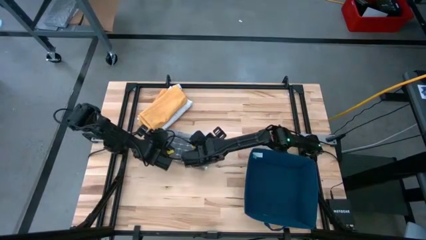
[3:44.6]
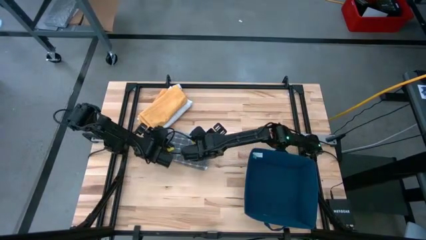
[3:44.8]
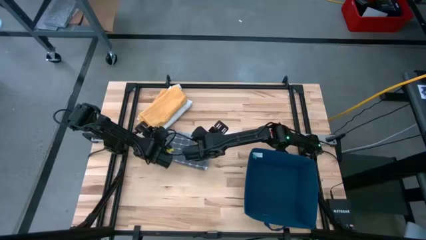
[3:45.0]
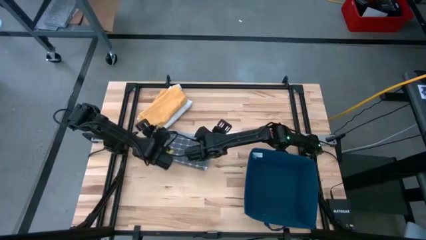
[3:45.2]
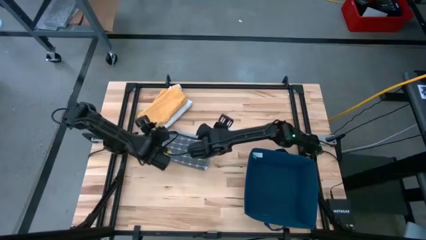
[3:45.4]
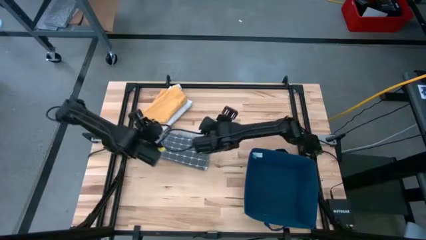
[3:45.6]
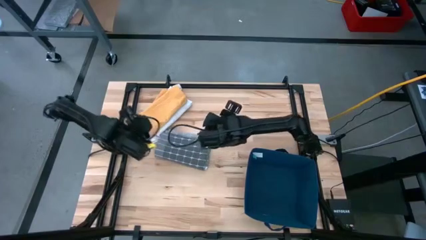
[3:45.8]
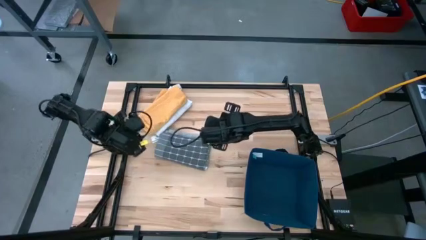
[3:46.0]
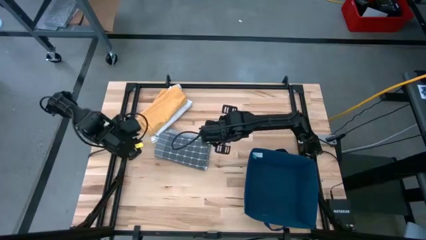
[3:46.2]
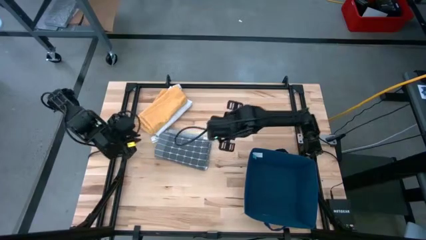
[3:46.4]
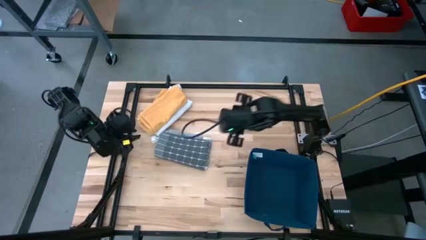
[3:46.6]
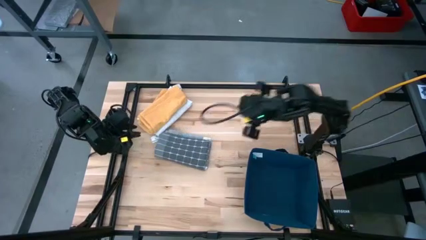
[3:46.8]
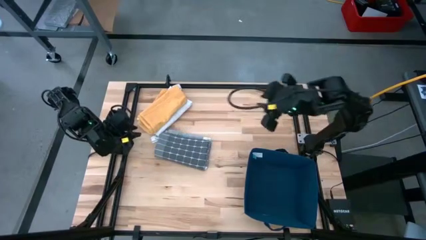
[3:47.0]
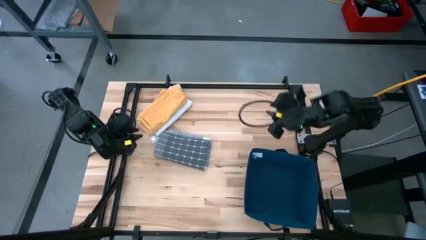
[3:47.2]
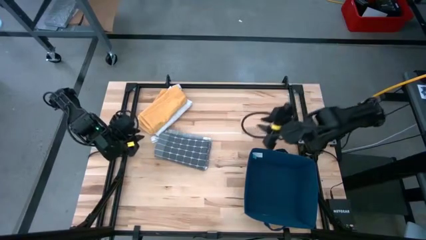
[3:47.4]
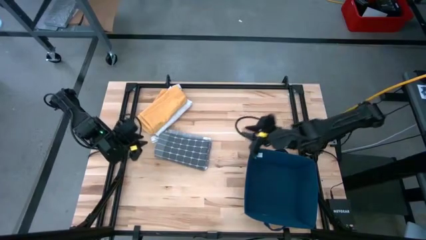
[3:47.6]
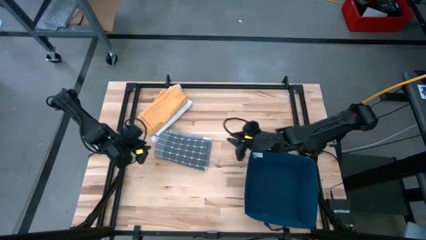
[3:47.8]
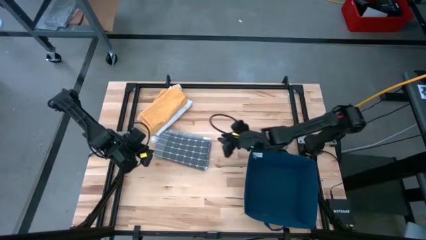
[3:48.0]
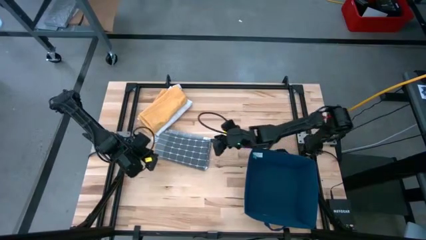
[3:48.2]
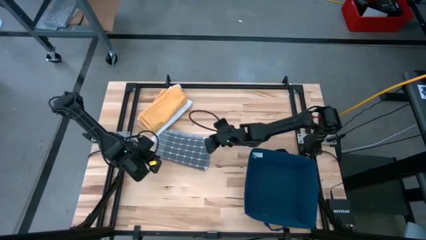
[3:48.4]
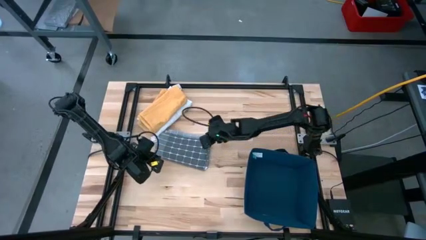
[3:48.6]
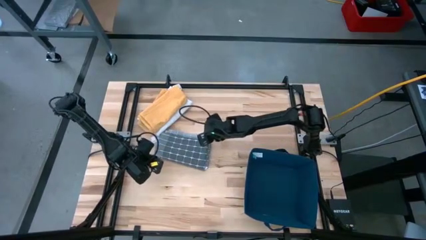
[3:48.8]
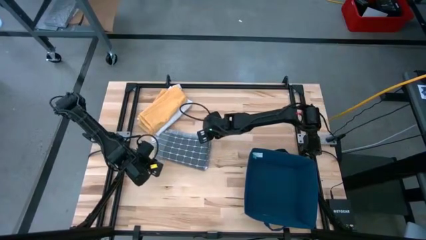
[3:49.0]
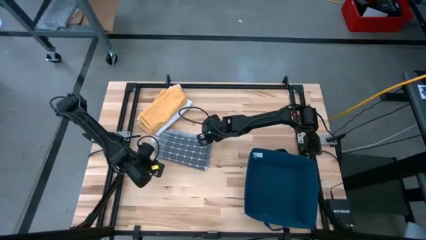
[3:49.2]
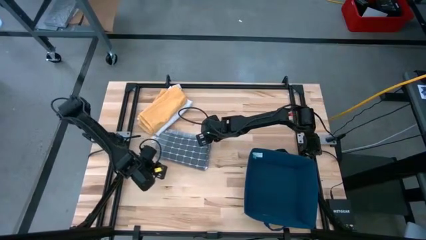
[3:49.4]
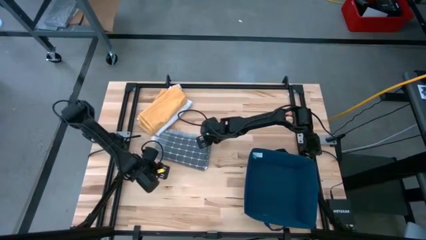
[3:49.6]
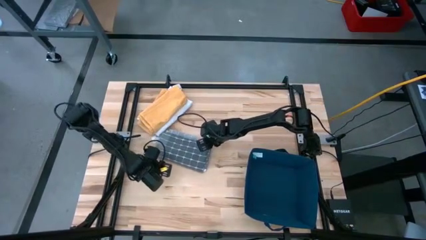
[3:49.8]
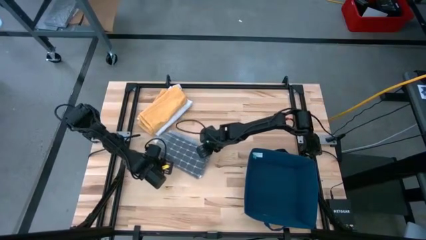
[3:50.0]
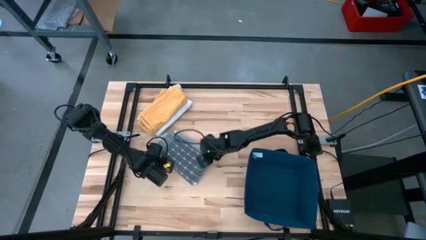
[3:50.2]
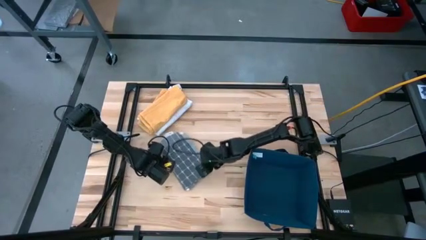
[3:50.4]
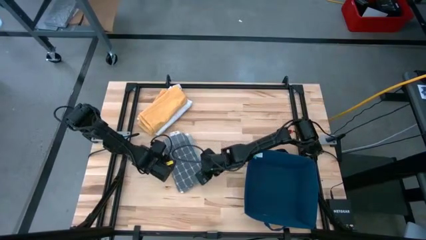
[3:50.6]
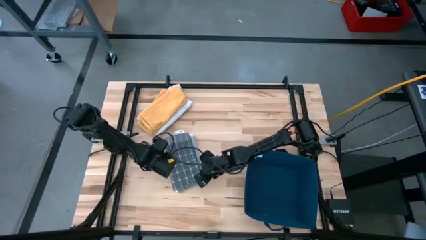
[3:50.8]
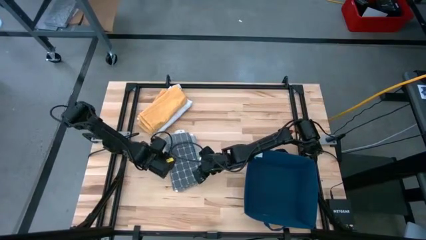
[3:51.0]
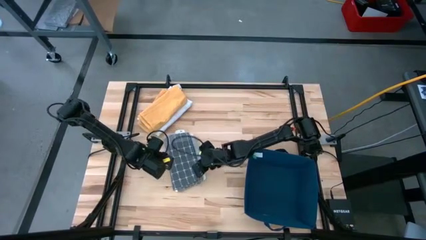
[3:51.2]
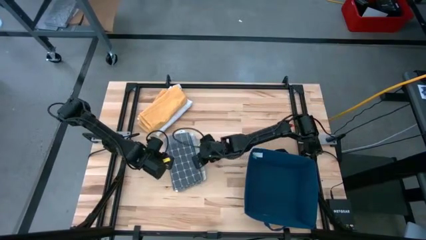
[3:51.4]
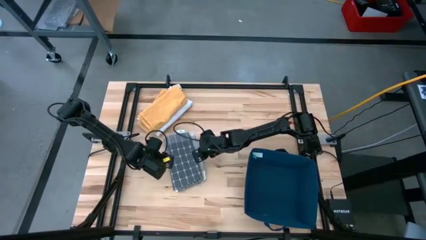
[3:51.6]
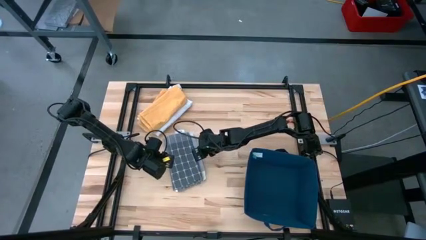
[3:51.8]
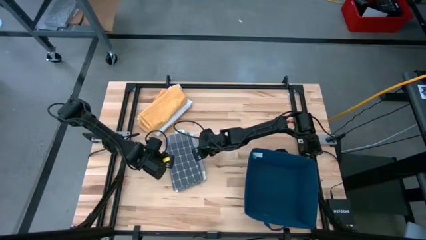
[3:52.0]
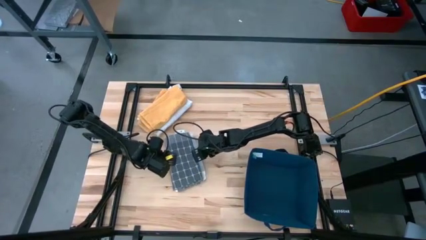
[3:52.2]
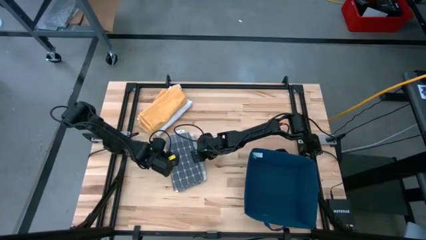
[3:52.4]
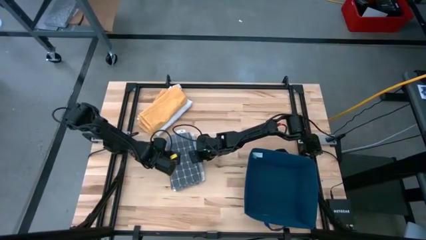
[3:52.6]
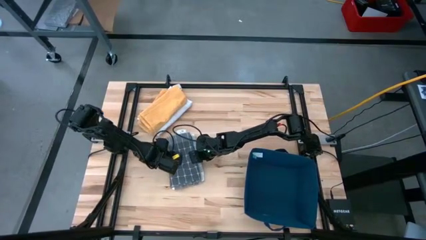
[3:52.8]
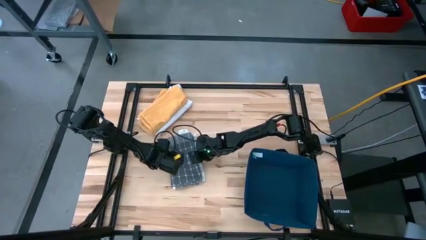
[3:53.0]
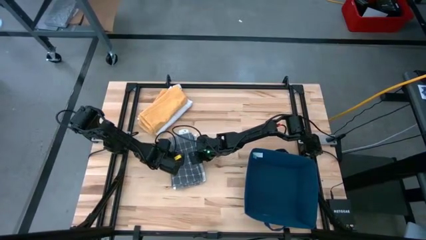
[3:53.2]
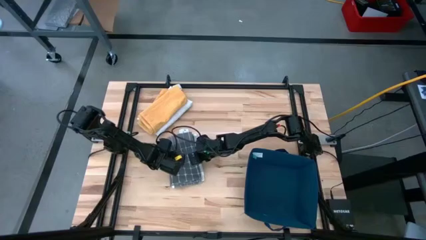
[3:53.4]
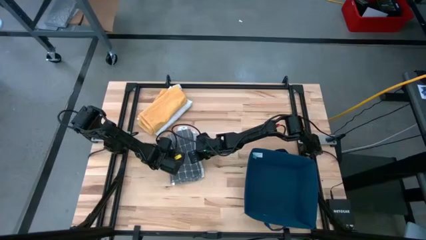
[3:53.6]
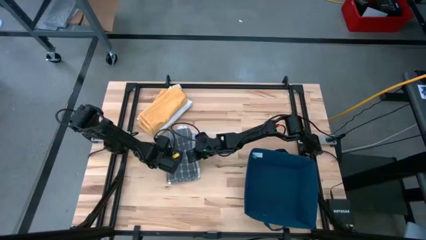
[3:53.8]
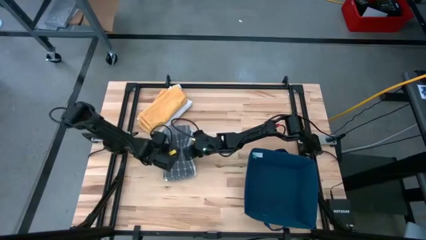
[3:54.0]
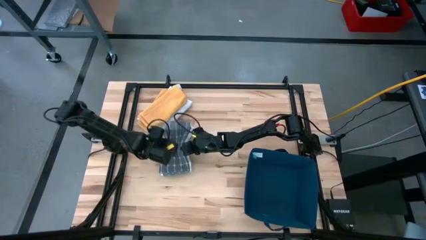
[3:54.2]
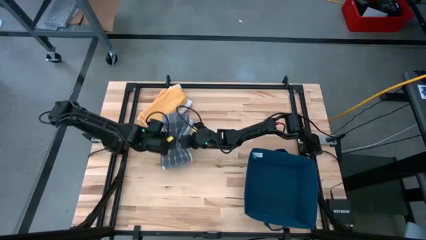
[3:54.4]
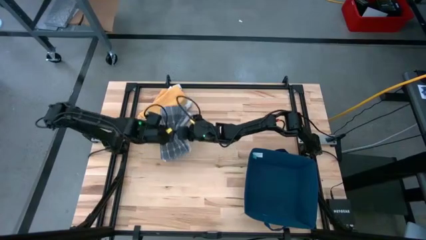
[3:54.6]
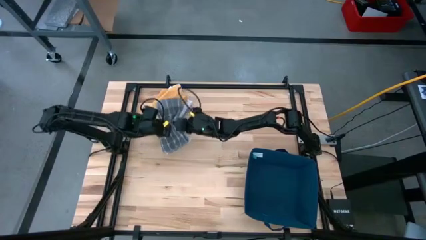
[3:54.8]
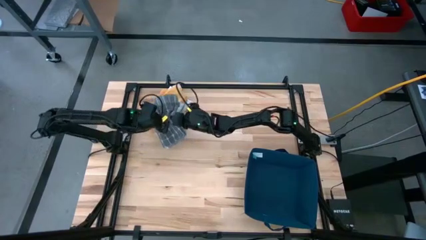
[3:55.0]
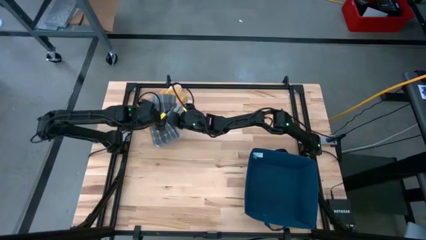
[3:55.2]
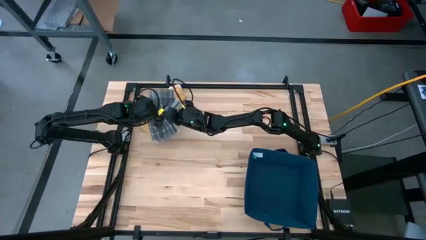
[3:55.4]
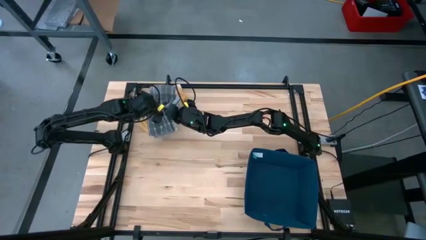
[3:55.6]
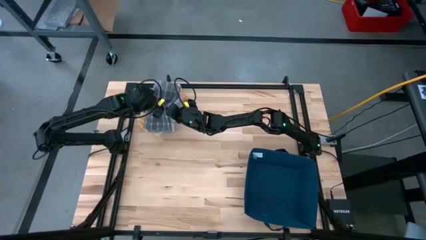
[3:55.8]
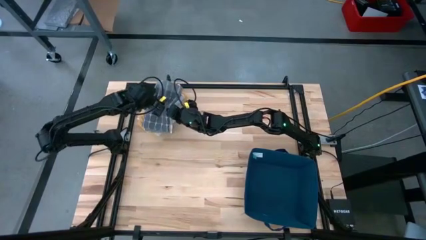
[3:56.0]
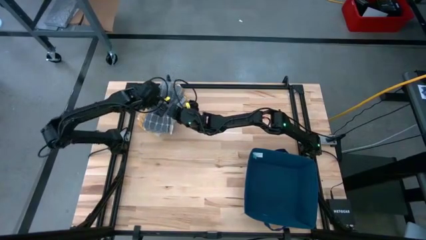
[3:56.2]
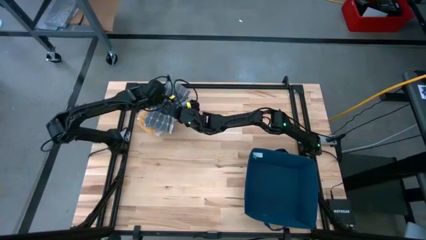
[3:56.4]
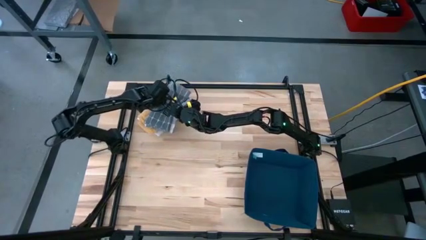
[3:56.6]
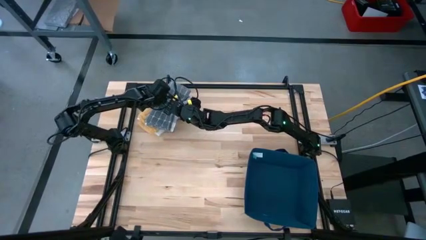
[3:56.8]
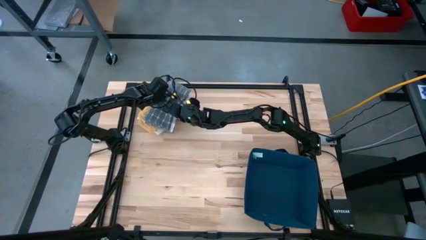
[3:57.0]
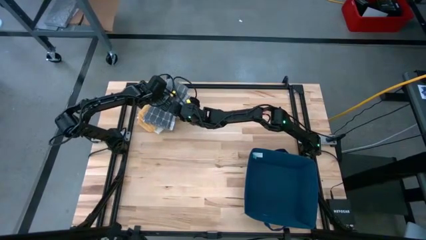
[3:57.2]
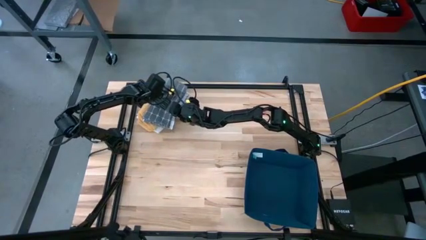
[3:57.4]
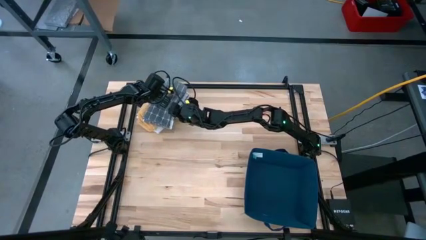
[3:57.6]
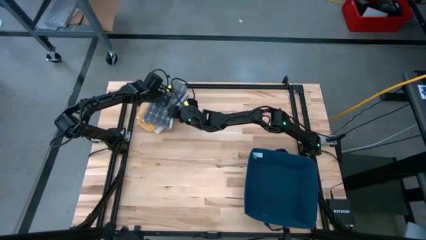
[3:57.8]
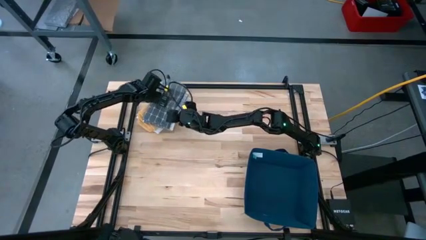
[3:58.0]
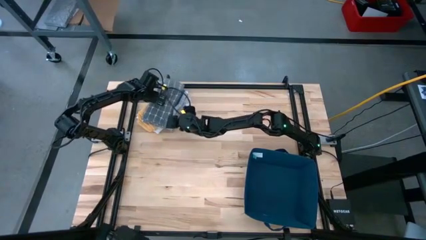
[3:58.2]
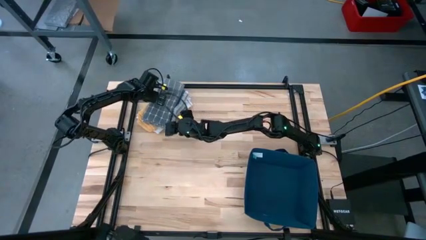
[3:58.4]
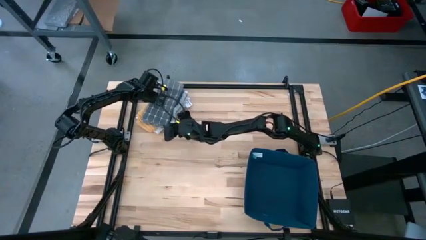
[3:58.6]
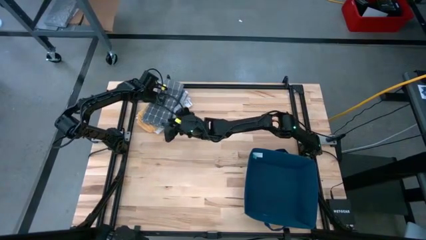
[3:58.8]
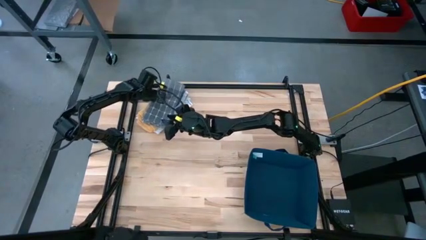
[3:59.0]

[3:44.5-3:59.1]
Task: Fold towel
Stack the gray towel on the yellow towel

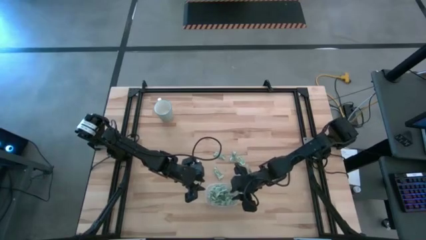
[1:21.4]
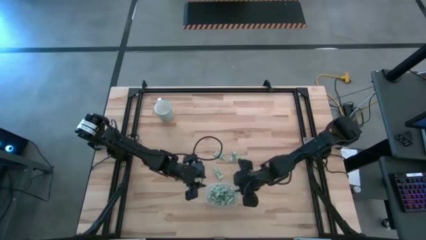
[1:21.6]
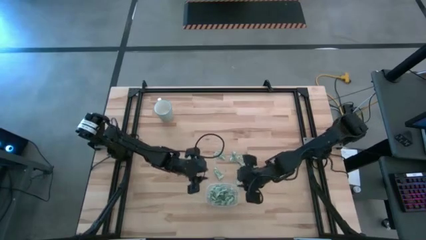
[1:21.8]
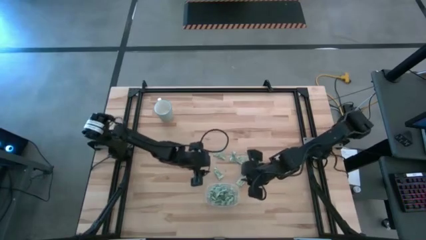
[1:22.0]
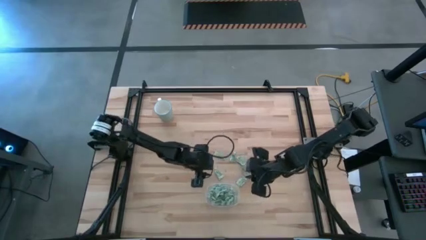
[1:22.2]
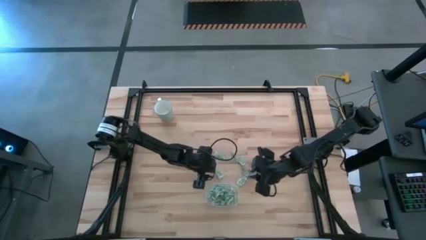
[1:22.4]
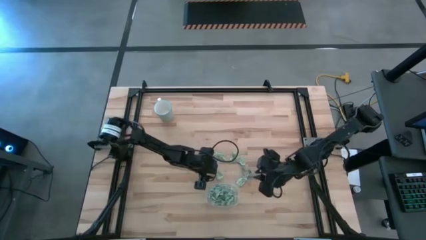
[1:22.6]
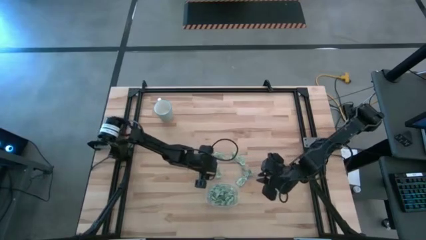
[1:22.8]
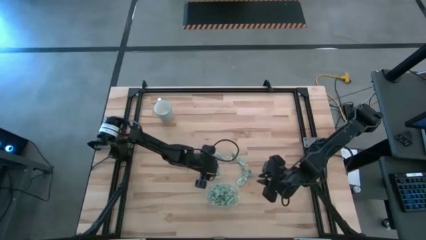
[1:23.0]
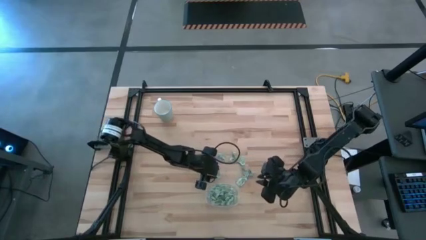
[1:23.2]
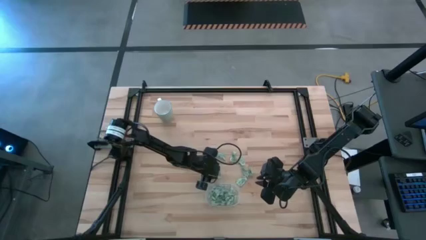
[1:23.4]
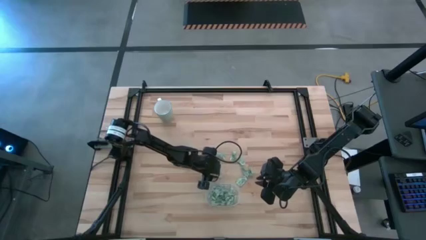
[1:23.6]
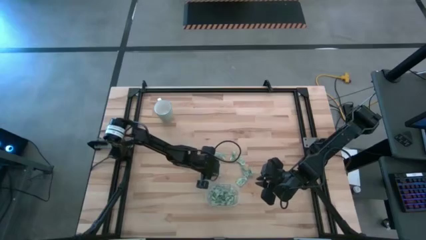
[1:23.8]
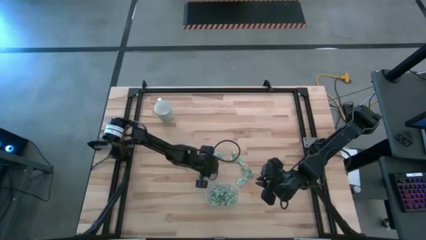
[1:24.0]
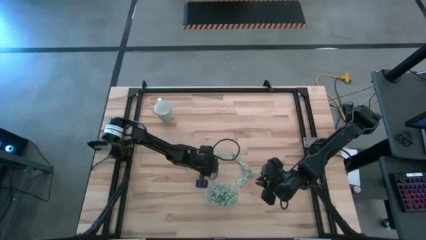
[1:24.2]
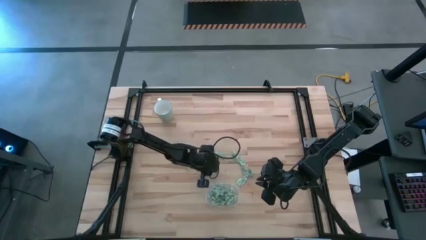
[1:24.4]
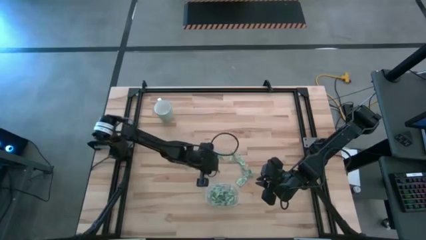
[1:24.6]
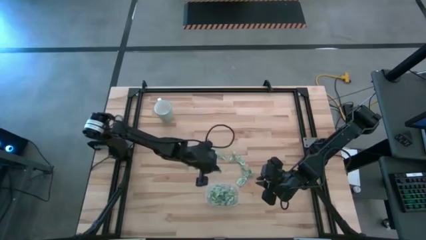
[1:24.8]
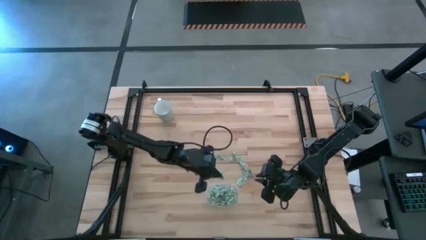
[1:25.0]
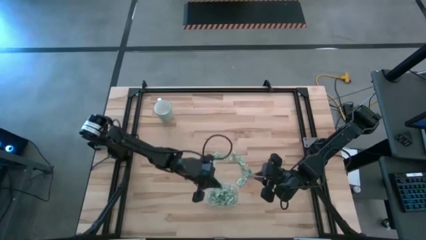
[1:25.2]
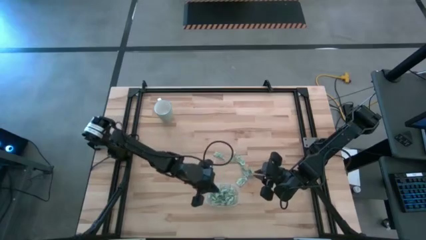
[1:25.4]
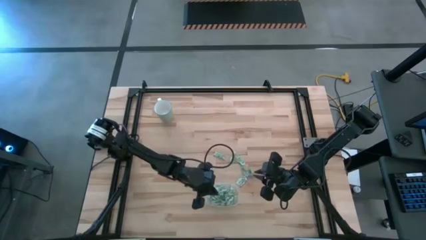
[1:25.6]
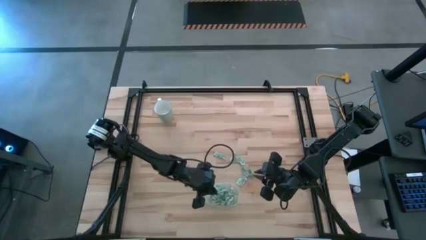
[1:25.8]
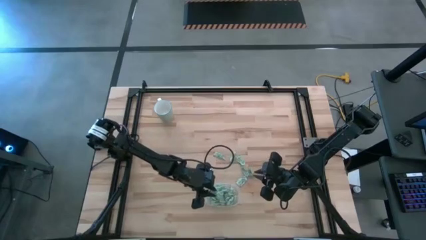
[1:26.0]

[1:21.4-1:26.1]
Task: Pick and place Stevia / Truvia into bins
Put the stevia packet into the transparent container
